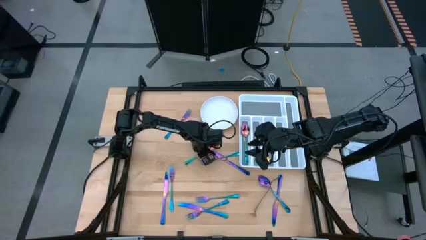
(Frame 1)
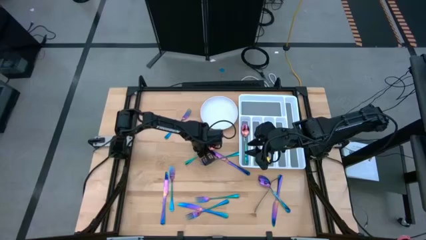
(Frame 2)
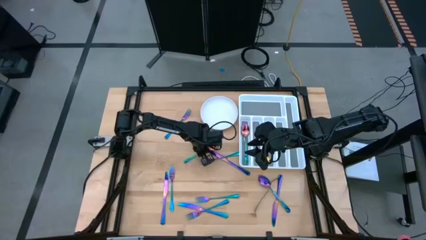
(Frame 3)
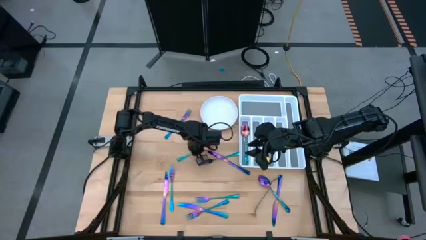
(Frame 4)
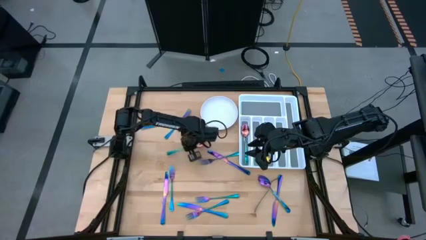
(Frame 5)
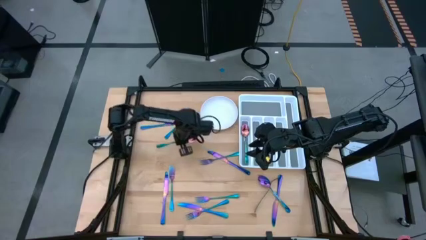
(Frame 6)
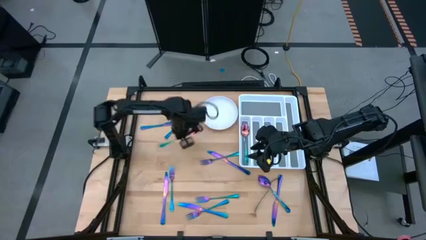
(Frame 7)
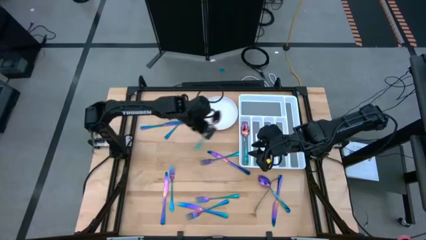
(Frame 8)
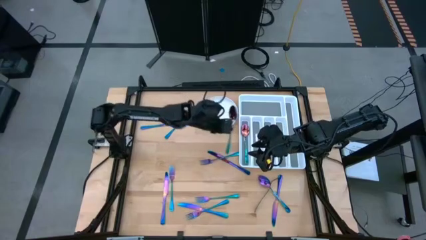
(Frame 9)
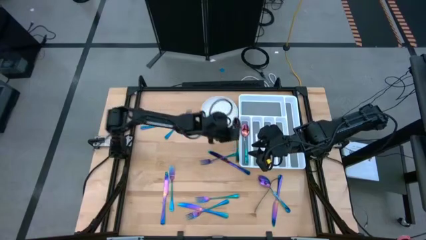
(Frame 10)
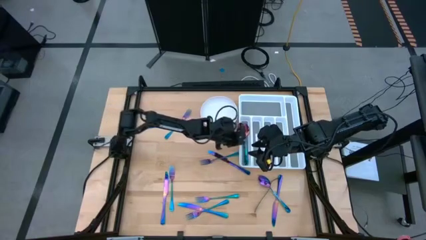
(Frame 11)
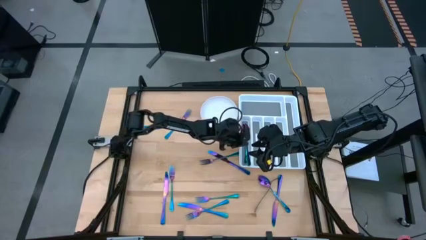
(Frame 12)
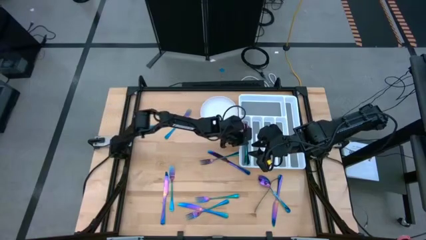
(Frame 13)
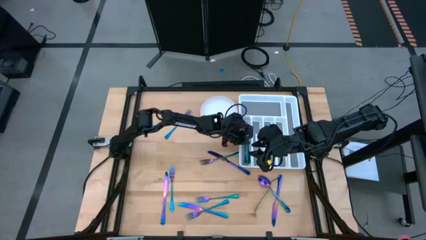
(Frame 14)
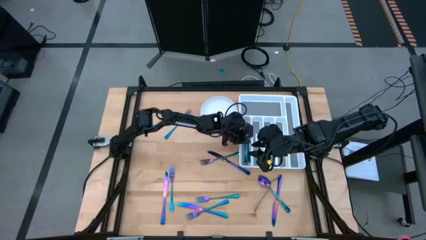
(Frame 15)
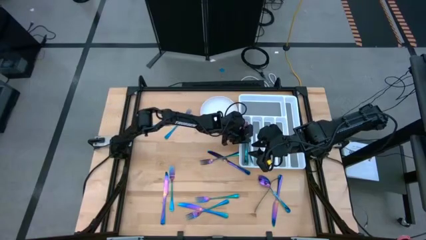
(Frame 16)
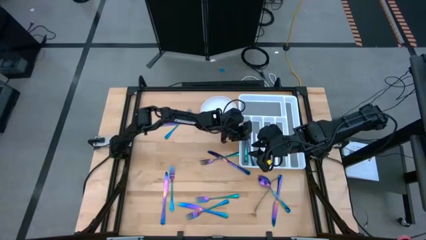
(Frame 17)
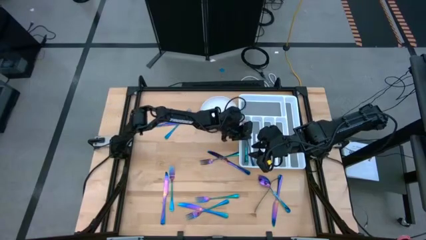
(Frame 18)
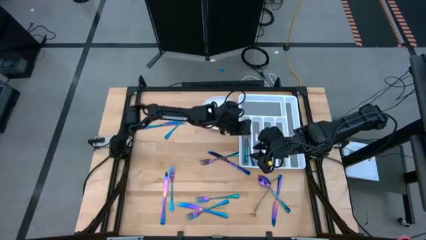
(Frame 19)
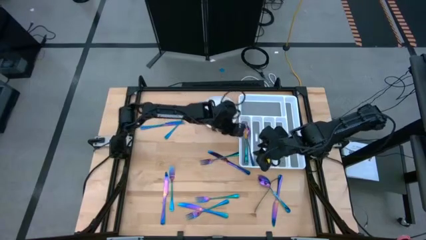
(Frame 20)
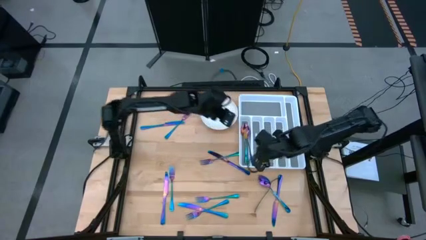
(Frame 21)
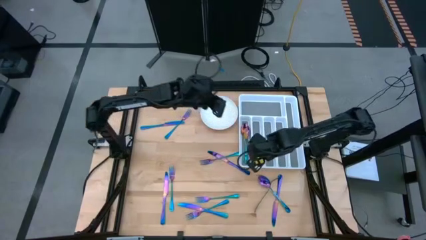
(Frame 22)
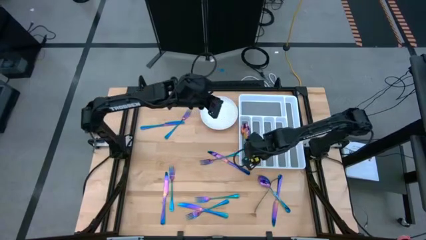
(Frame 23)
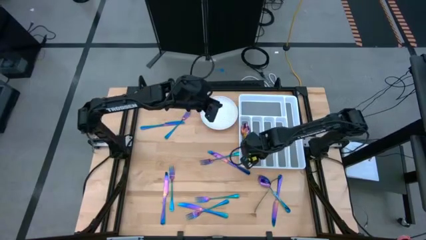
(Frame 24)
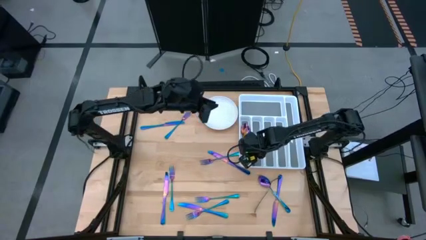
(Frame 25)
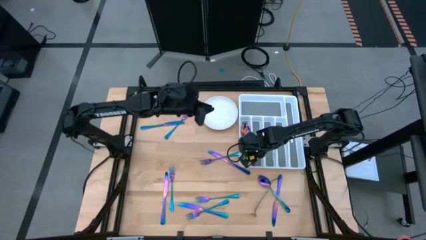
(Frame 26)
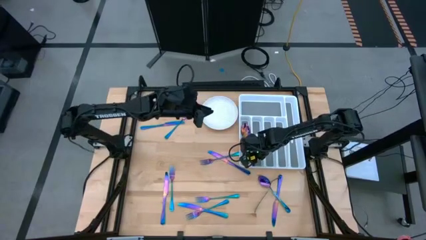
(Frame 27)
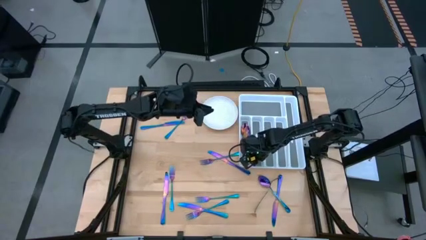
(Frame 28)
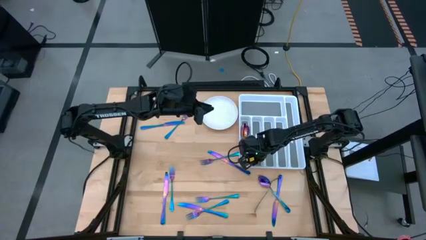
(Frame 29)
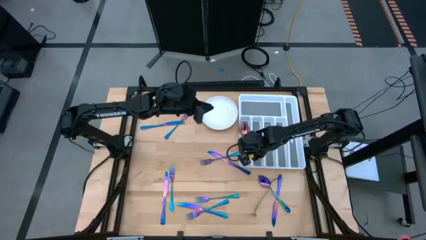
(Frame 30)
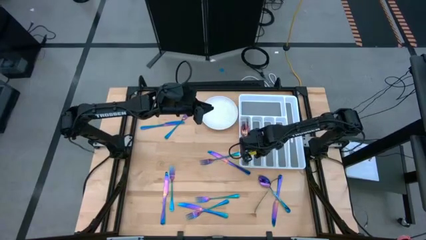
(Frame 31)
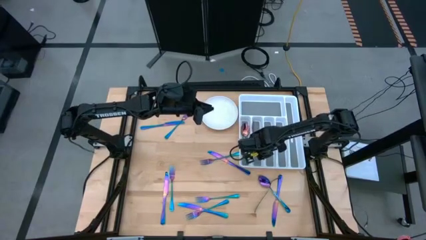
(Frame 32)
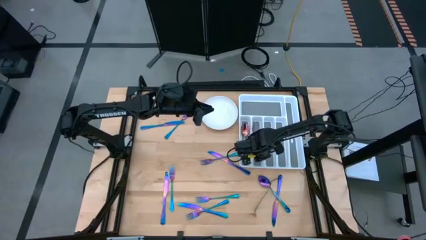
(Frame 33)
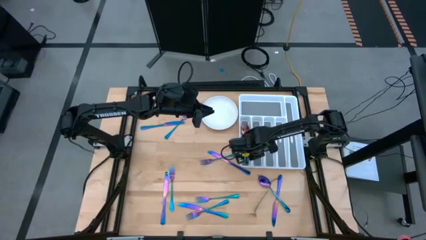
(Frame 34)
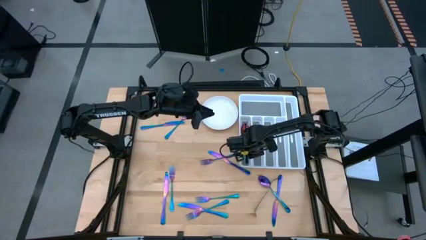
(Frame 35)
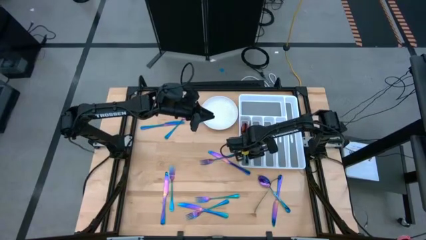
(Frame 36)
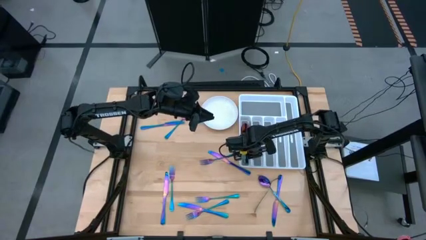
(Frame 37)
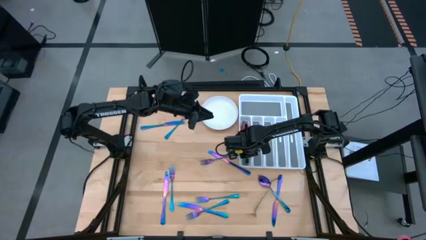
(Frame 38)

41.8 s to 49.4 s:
Task: Sort silverware
Put the purple spoon on the white silverware tray

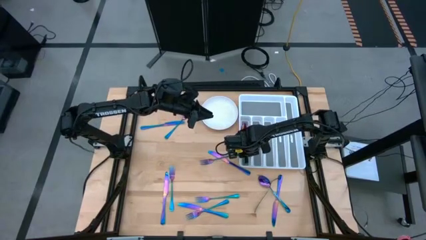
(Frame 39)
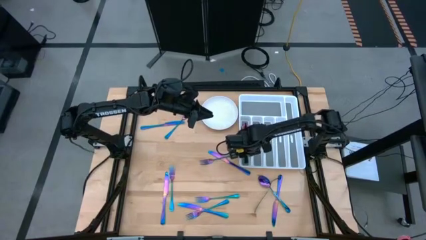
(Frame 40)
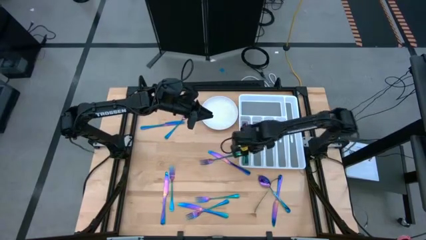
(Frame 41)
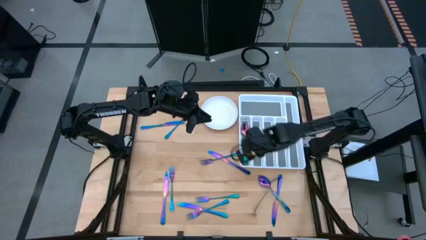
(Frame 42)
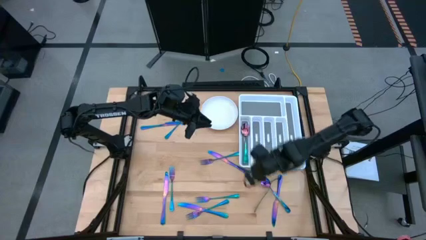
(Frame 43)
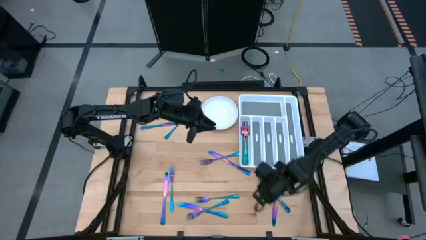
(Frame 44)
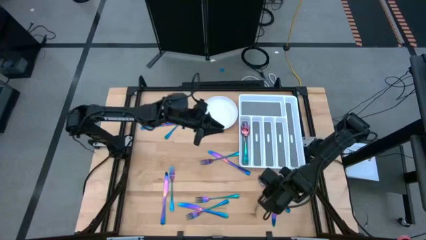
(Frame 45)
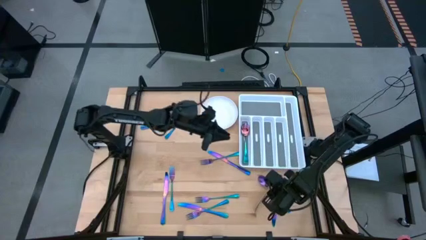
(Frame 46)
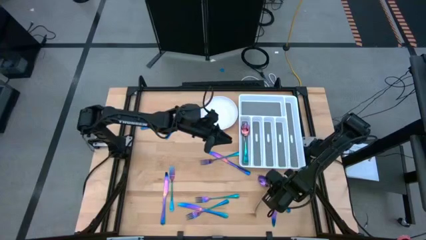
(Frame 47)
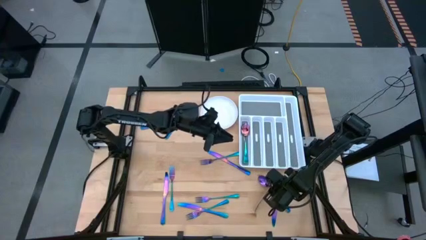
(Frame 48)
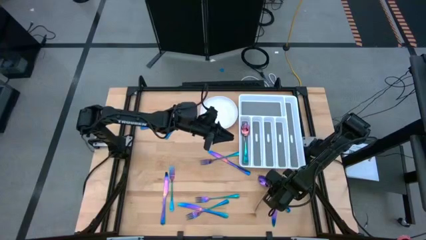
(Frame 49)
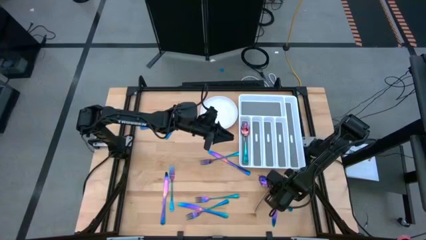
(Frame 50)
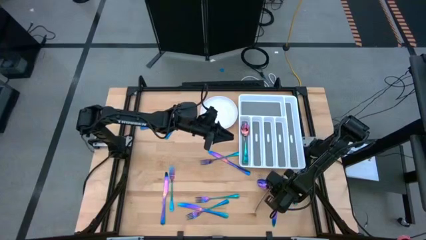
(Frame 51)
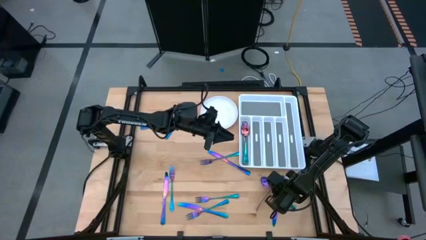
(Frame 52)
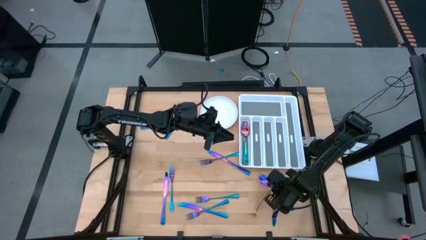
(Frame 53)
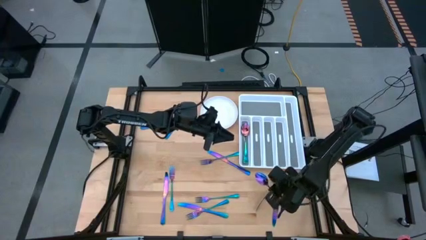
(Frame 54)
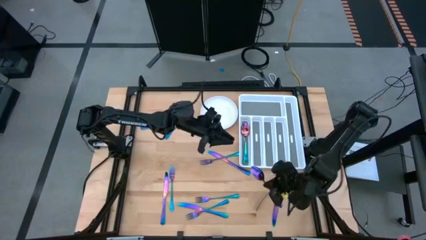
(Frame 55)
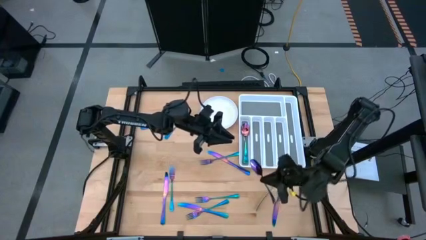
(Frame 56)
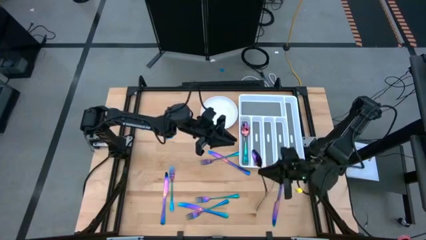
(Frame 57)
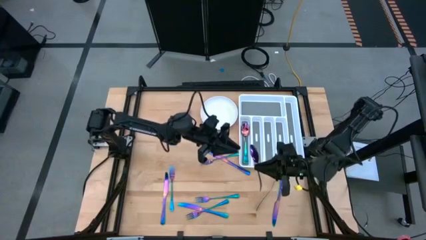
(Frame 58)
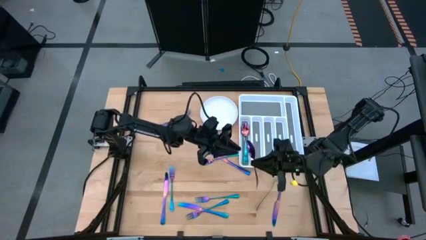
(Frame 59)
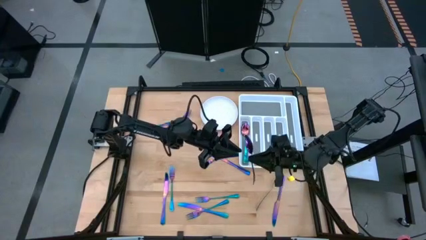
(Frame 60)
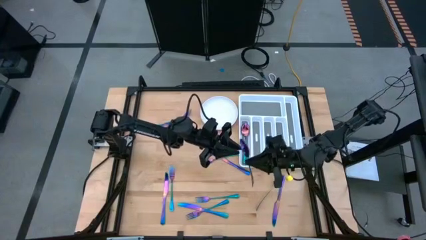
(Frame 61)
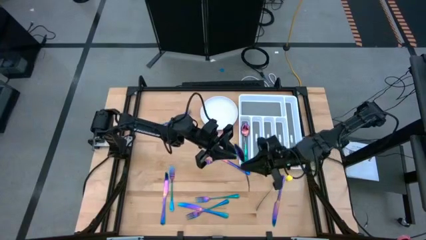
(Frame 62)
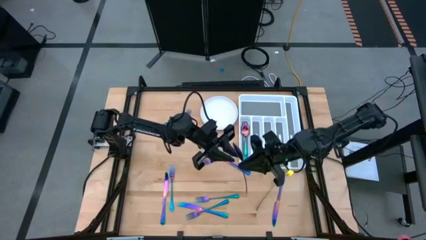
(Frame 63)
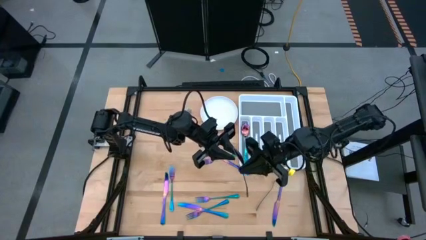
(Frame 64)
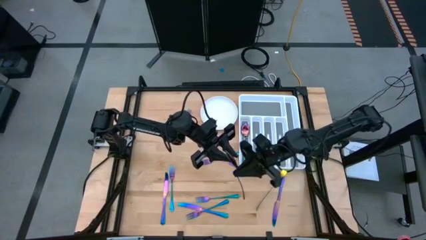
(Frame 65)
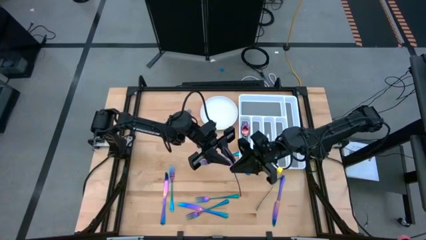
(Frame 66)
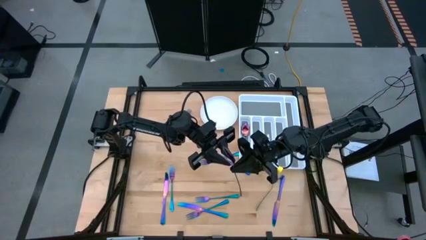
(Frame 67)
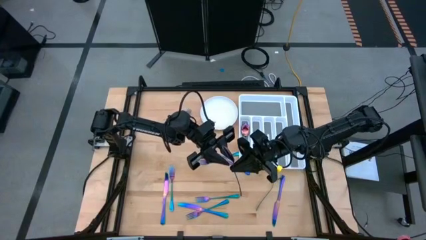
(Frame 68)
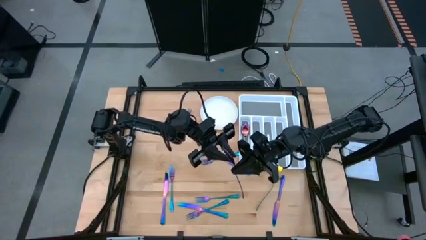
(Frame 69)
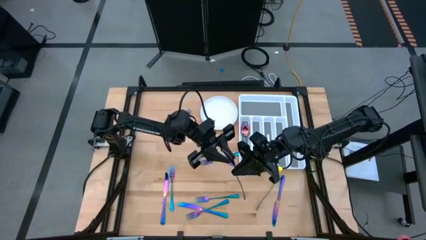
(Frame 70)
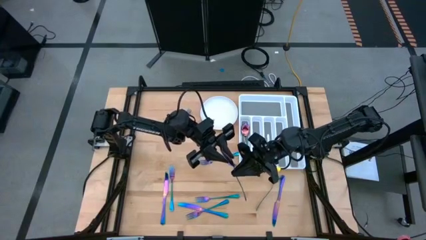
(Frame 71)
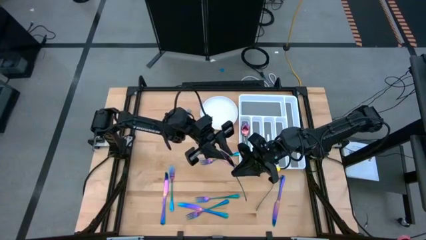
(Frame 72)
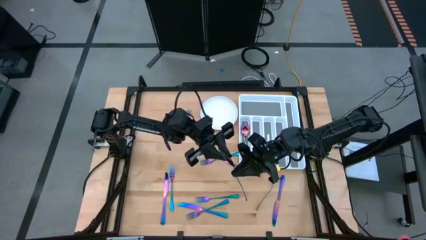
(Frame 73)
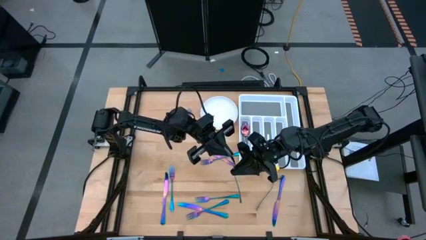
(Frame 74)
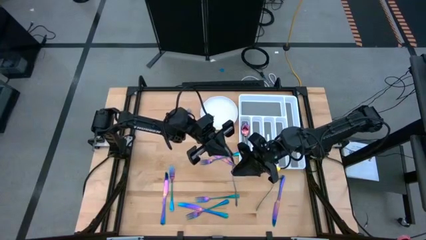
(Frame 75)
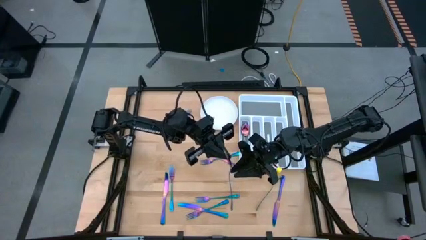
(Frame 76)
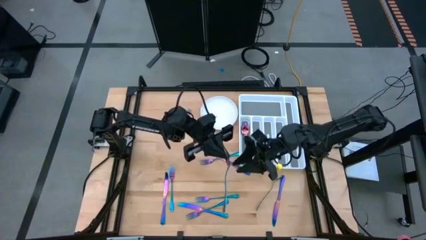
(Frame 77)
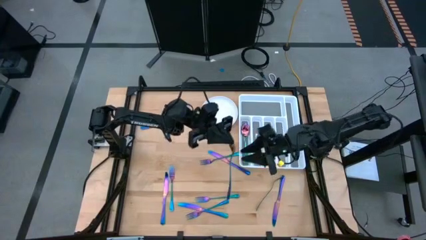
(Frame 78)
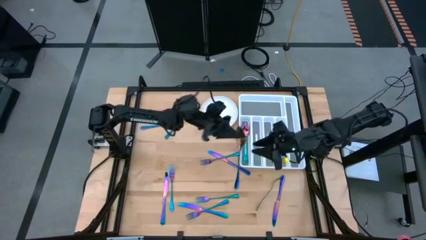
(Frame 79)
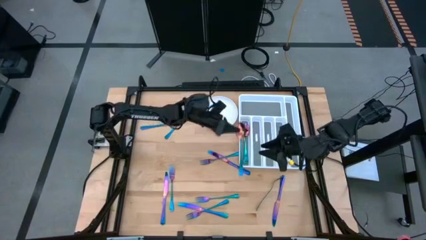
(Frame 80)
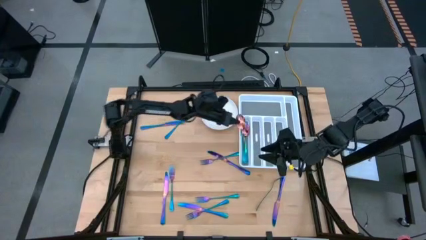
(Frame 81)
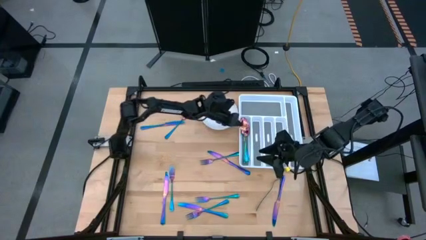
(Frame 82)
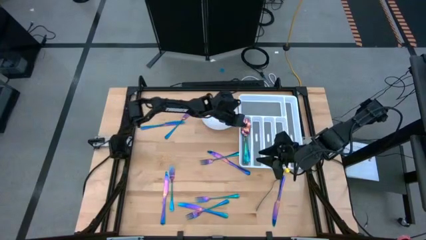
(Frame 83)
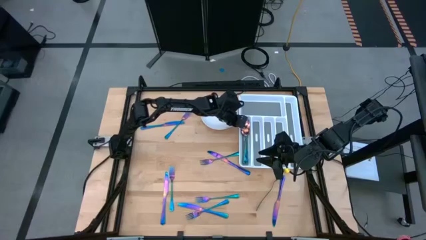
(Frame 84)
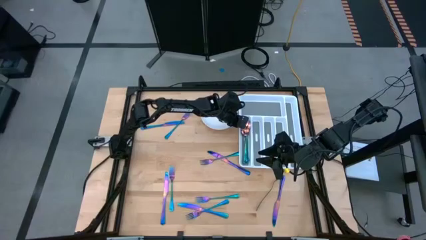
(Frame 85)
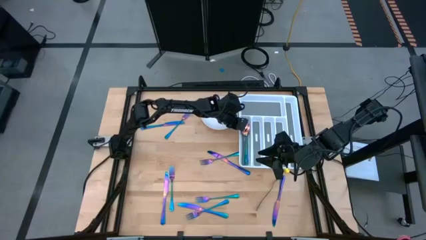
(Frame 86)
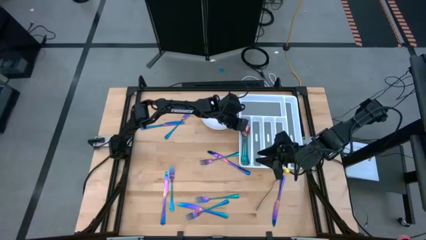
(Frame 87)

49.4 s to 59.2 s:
Put the purple spoon on the white silverware tray

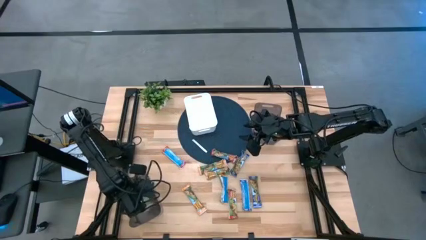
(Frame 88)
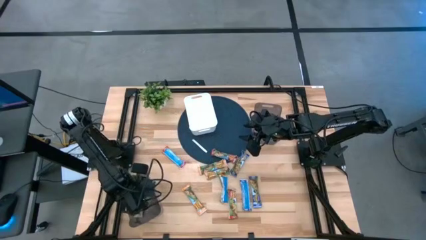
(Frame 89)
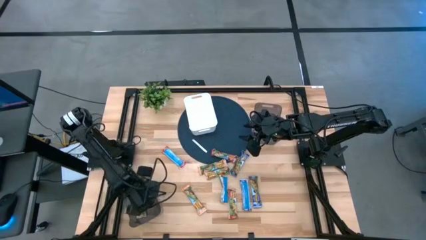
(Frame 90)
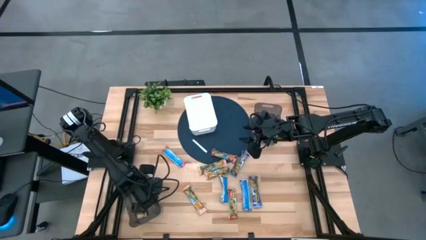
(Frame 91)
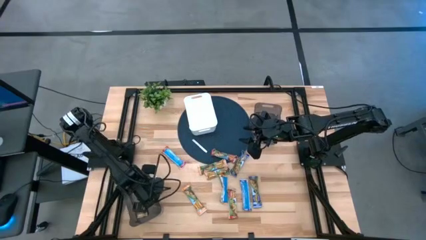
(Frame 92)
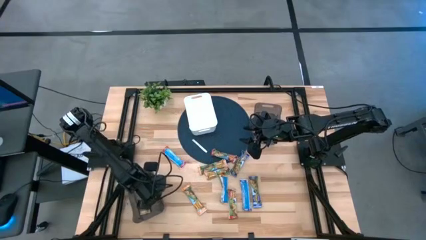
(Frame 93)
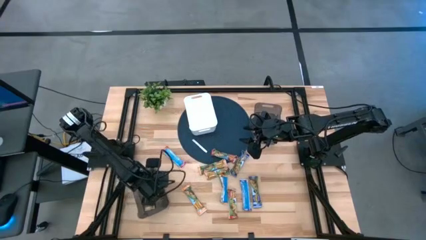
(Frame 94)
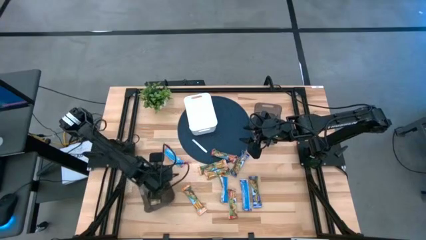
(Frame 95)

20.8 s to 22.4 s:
Task: Pick and place Granola Bars by type
Adjust the bottom black bin
